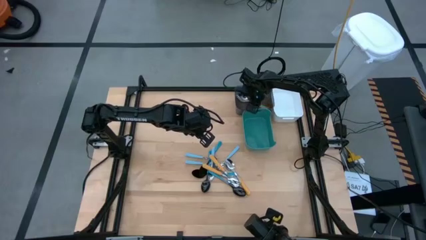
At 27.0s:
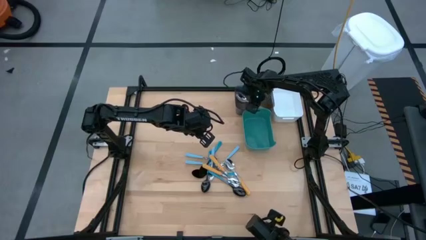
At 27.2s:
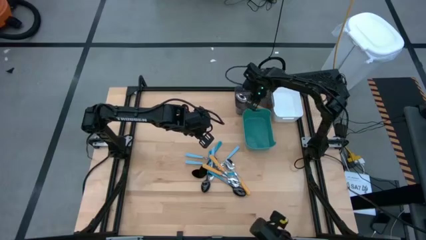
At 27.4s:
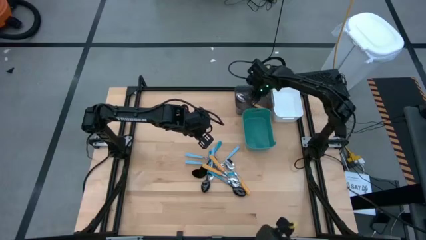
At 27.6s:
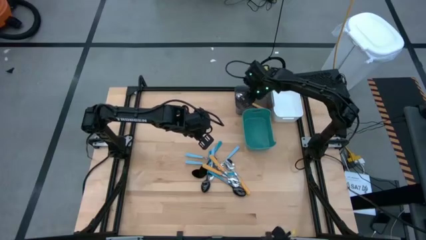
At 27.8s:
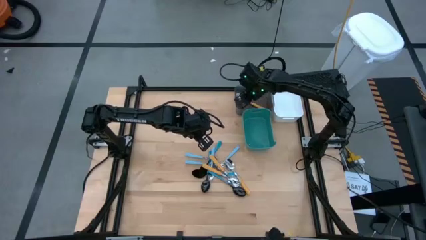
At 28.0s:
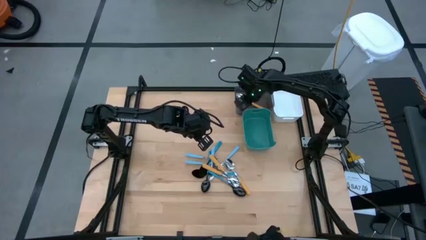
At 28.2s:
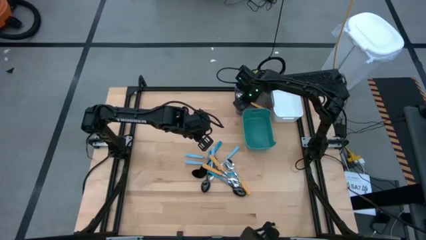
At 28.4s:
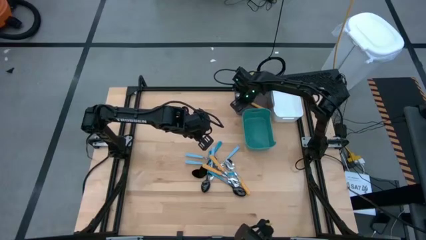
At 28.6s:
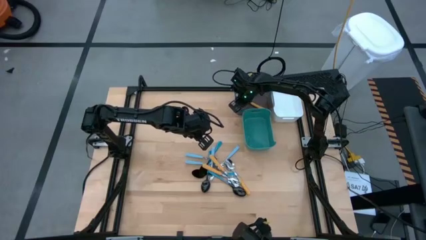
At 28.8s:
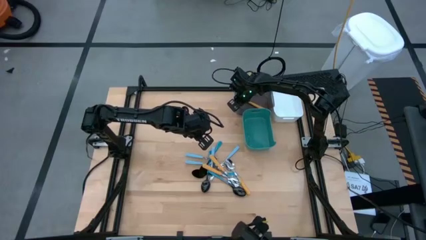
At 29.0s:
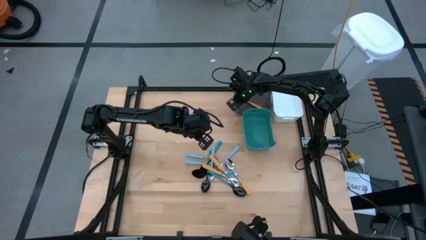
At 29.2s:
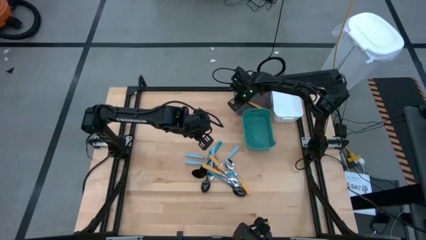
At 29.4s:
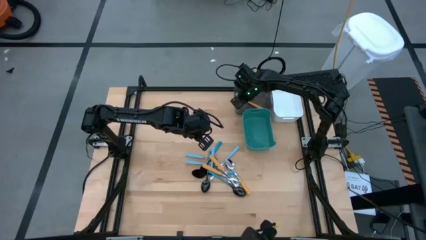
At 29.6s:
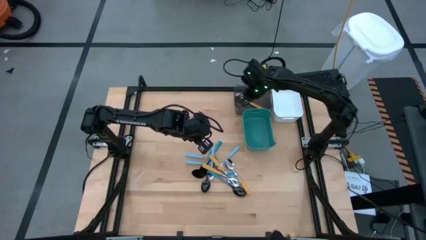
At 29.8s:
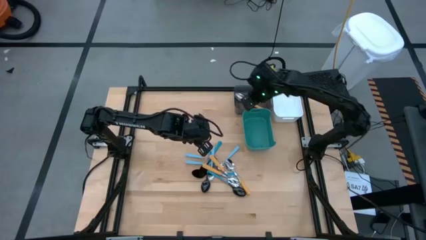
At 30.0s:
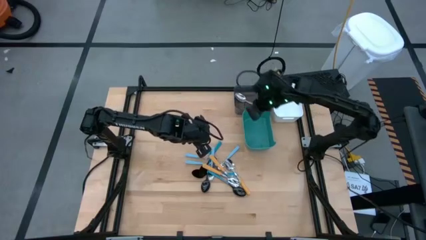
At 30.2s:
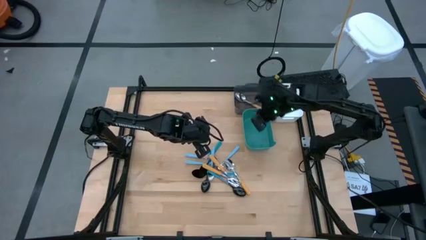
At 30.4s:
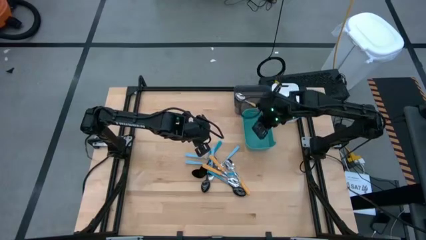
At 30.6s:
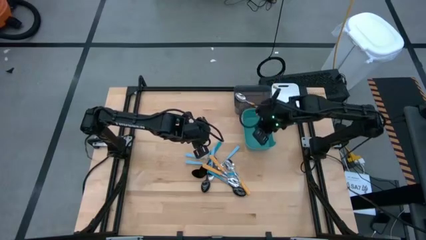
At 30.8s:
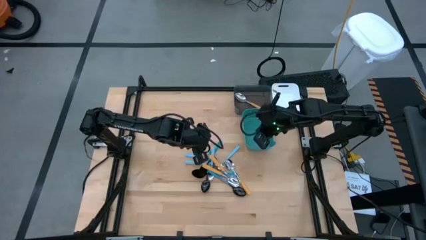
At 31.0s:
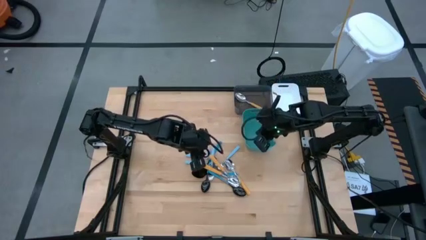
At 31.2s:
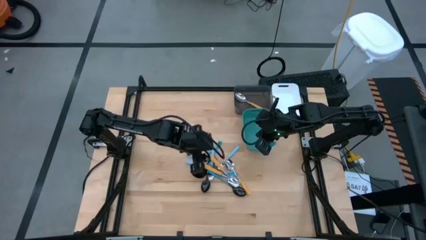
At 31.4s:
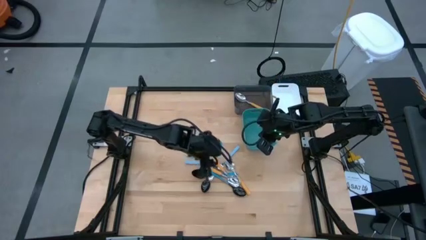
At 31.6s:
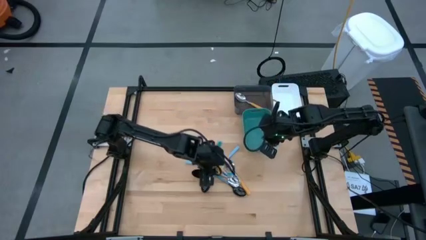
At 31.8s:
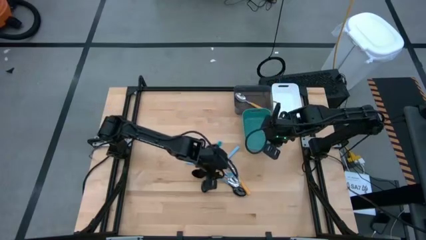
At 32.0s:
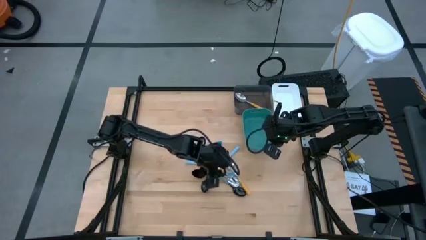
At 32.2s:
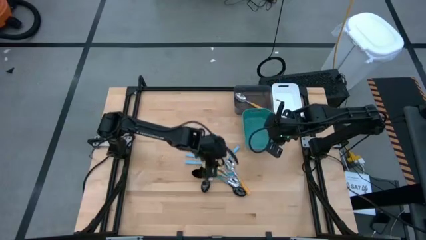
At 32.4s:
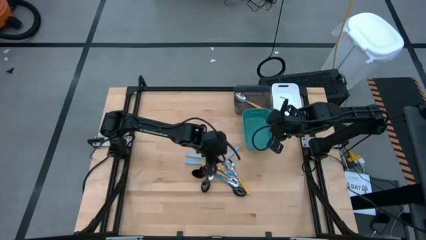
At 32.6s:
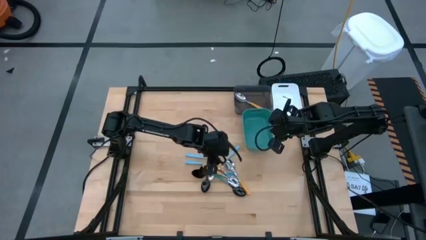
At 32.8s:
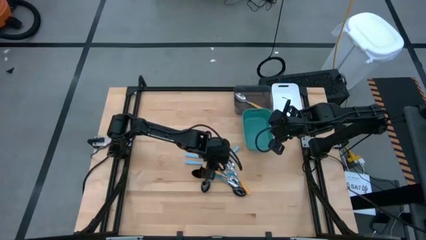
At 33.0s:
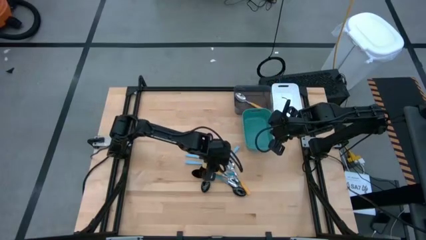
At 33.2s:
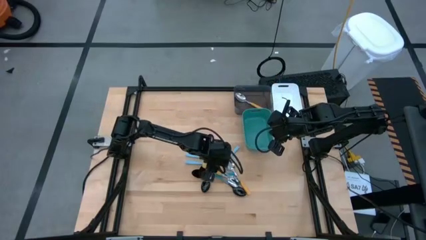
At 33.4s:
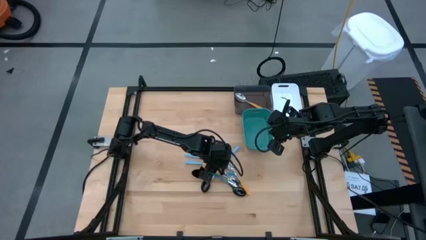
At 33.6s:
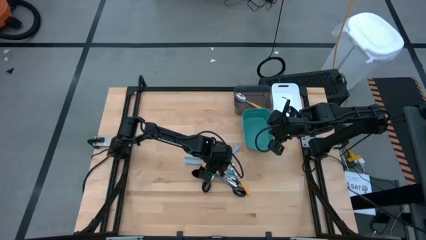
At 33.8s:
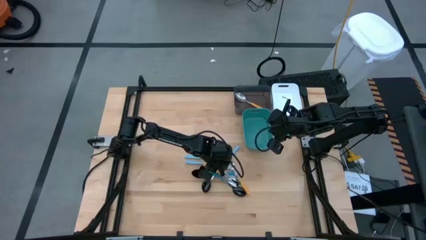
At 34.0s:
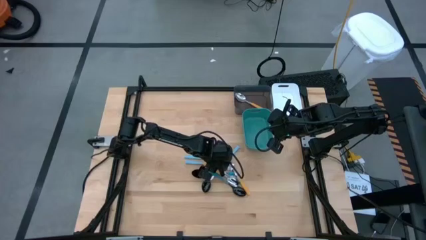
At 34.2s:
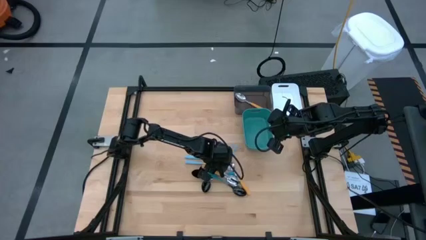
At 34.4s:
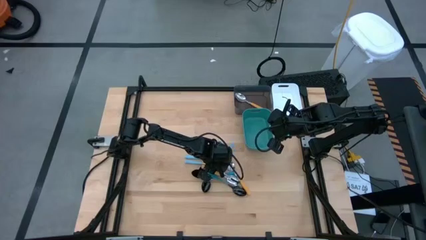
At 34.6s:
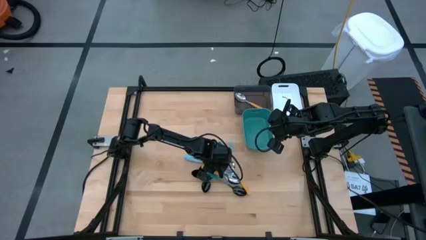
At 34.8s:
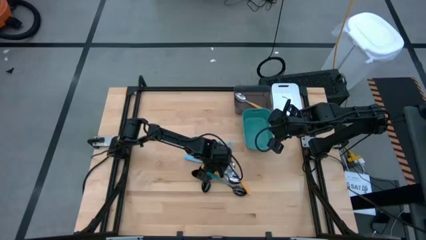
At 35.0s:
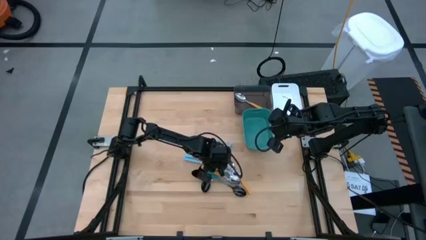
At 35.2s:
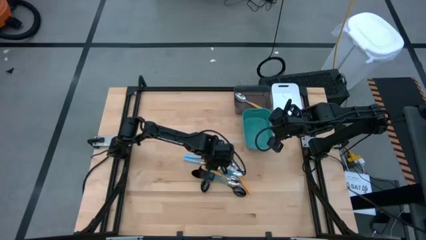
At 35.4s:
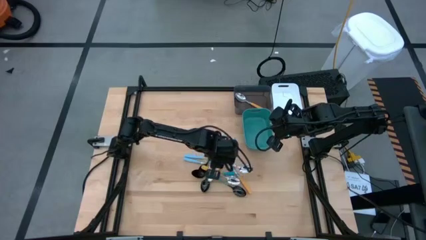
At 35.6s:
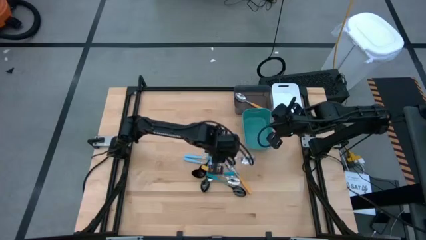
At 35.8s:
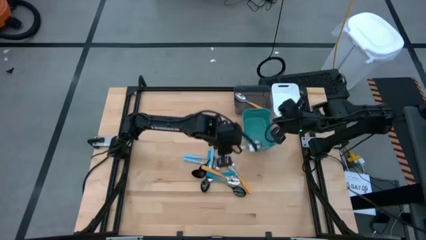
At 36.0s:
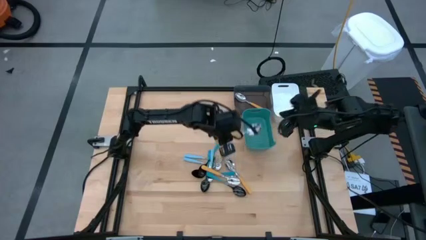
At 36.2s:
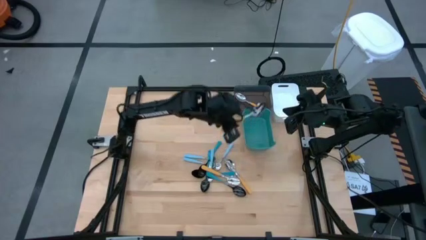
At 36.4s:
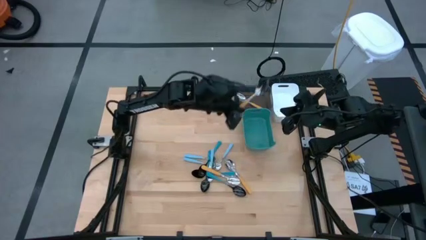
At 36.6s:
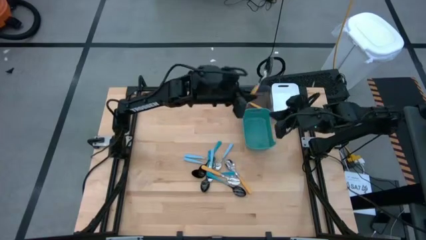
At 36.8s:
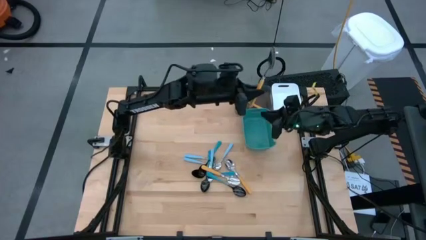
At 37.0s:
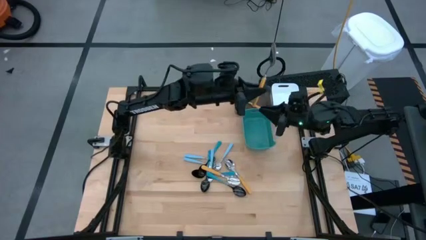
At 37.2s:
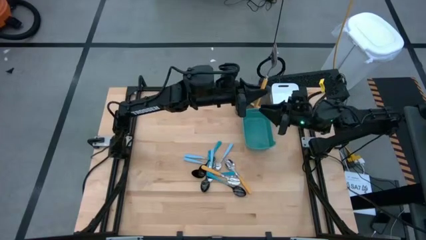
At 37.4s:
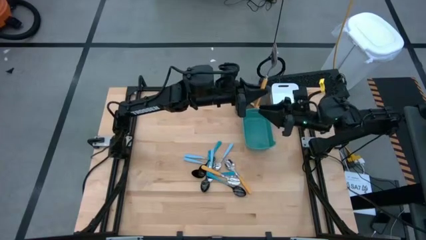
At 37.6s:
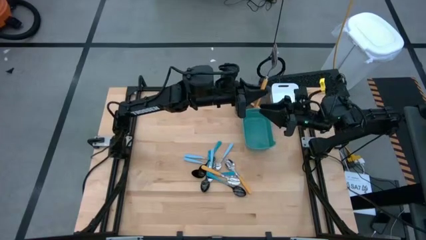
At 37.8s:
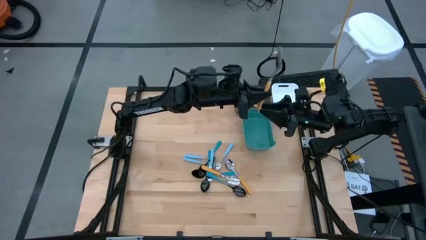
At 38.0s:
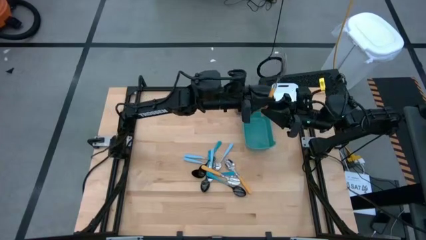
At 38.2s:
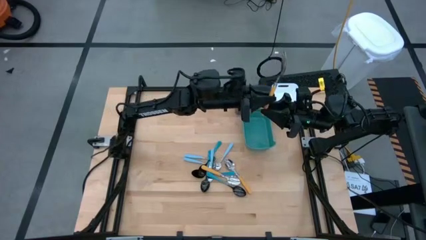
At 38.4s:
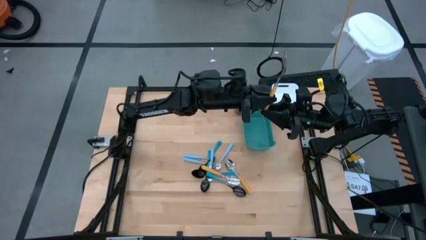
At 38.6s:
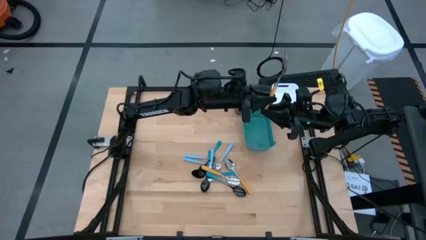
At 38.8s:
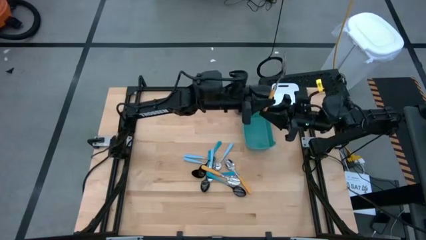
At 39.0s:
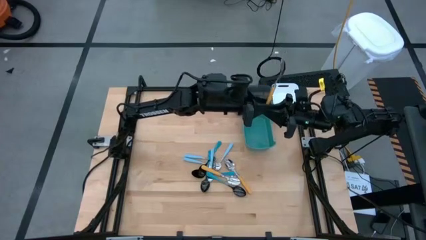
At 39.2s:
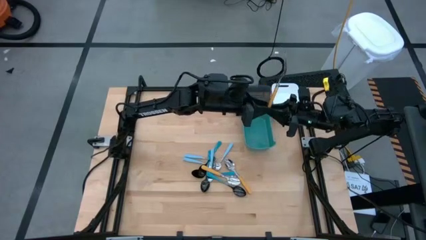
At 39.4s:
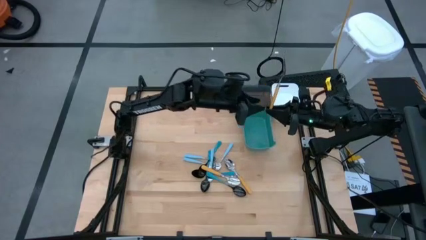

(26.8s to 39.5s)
Task: Sort silverware by color (type)
Put the orange spoon into the black bin

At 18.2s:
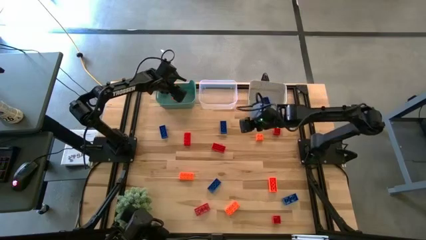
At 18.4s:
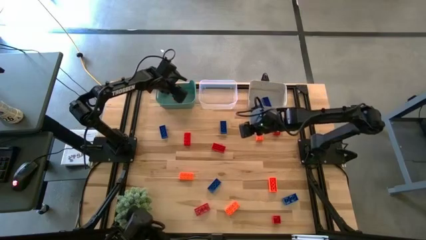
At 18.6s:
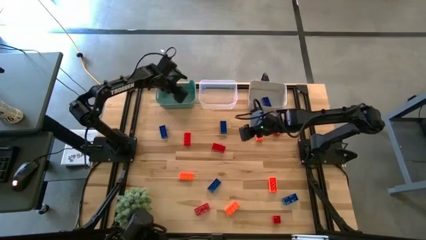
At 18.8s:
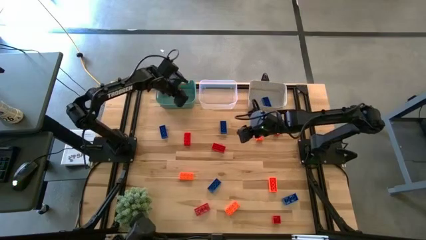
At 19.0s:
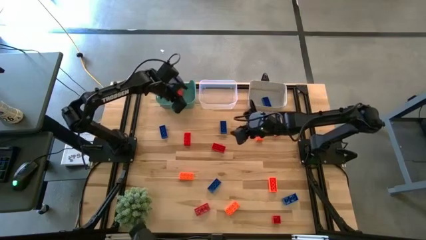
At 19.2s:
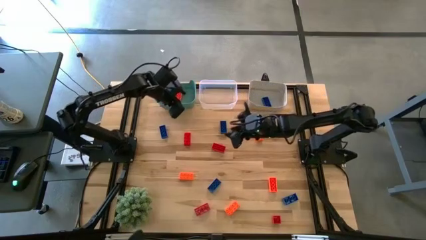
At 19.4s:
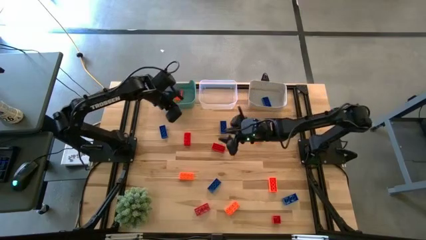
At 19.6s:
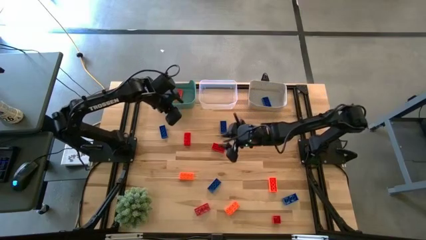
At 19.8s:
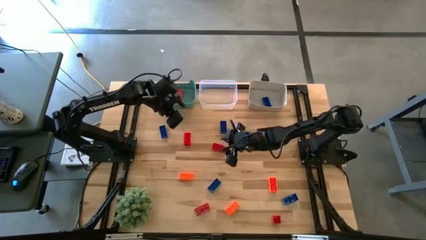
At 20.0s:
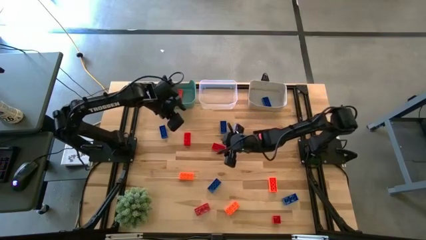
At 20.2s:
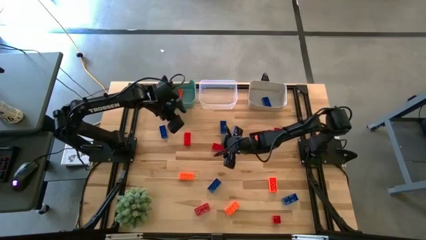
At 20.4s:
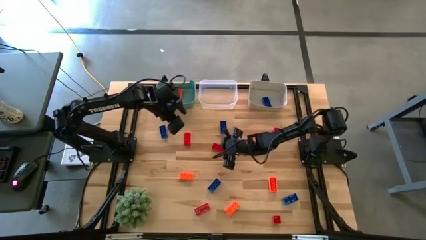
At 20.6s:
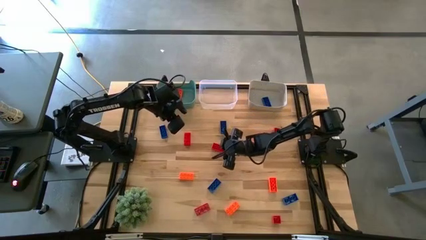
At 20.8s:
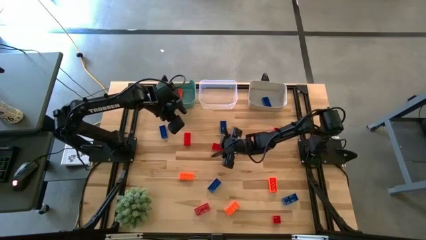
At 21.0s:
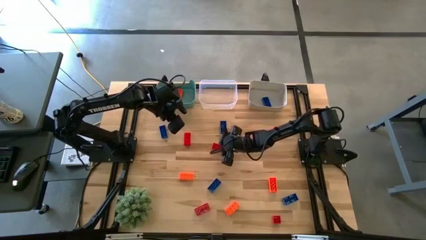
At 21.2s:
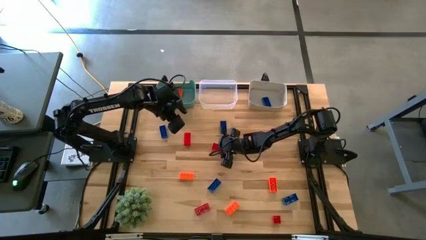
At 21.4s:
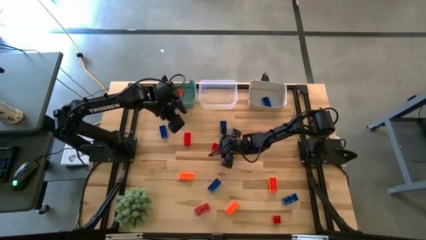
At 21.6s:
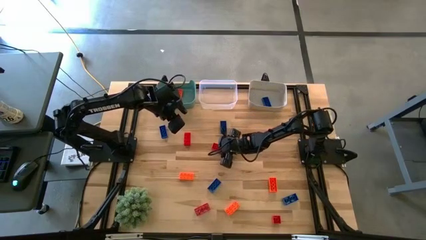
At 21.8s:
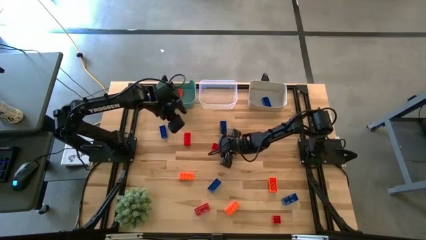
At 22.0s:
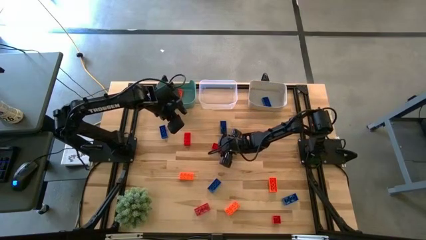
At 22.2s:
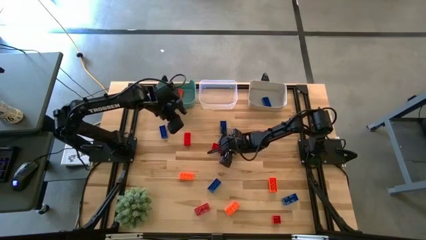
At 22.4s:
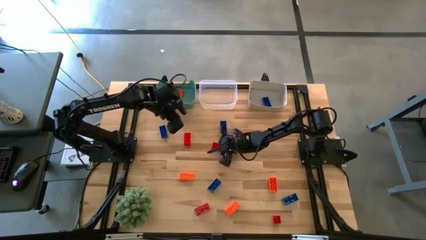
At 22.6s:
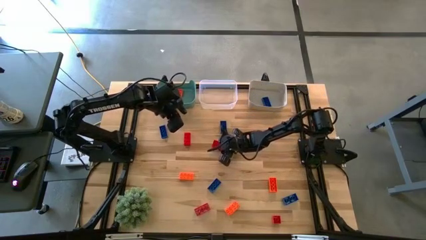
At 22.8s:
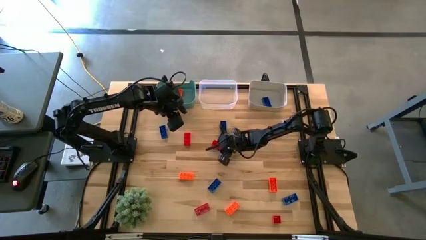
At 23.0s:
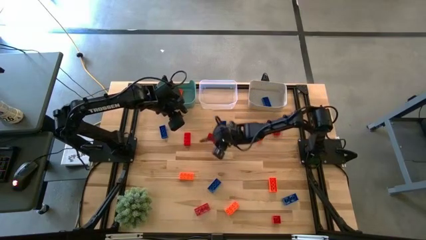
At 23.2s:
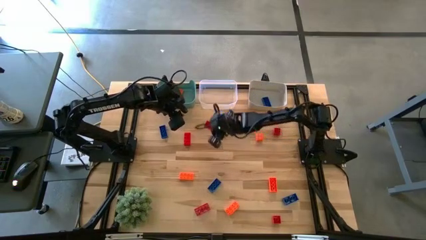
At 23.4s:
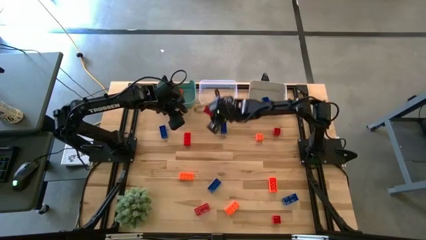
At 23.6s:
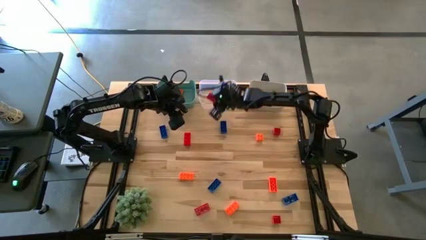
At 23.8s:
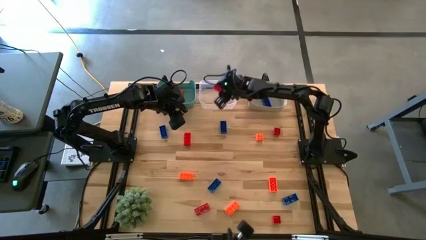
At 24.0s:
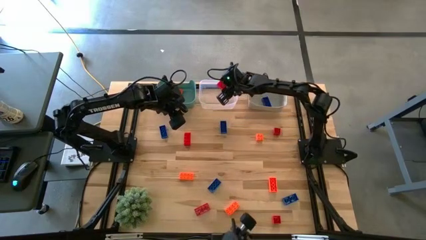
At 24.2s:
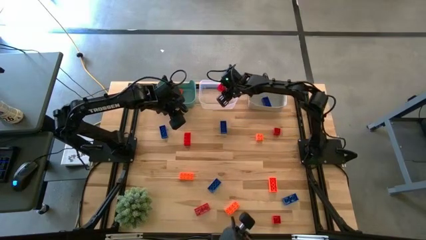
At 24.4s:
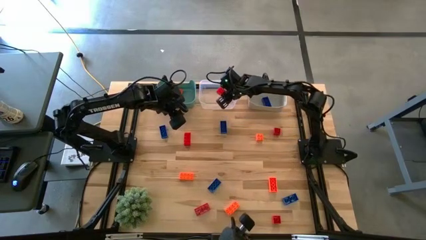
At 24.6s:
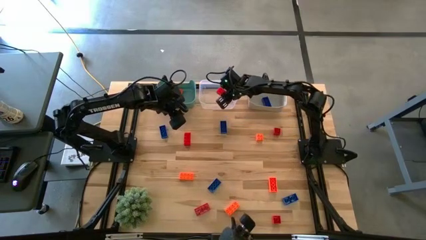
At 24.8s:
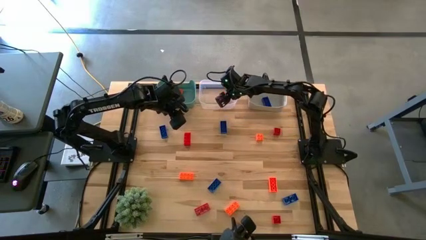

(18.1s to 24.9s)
Task: Sort & place blocks by color
Put the red game piece into the transparent bin
